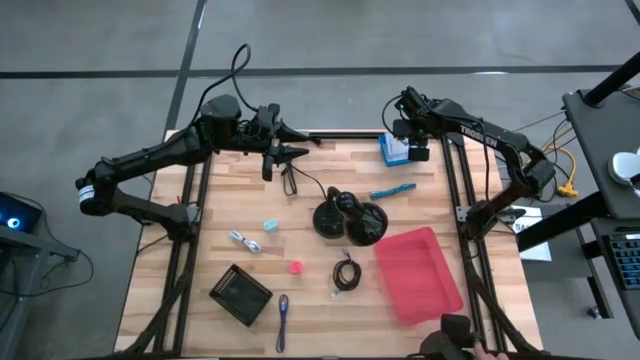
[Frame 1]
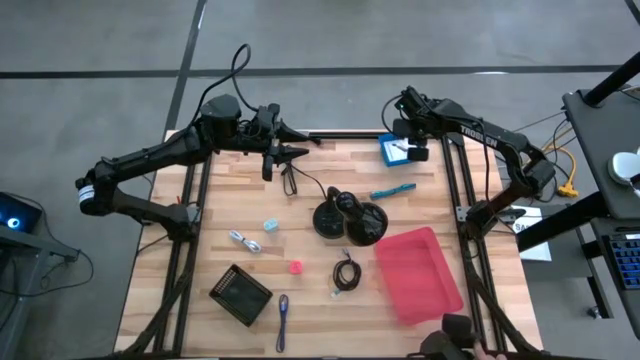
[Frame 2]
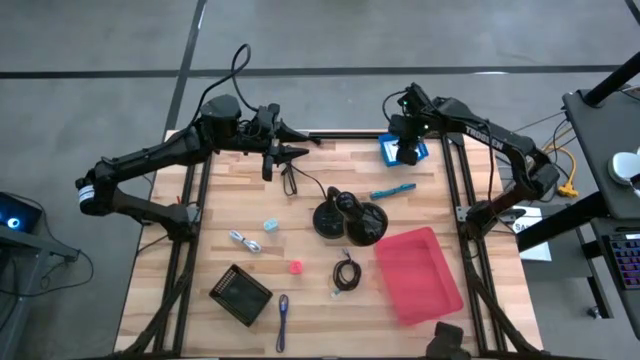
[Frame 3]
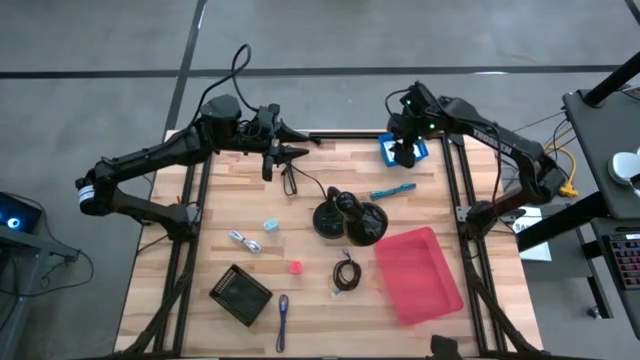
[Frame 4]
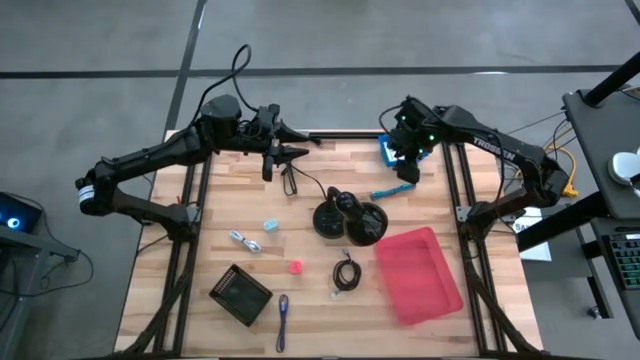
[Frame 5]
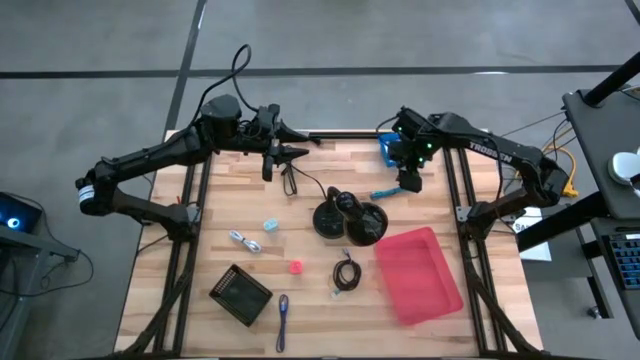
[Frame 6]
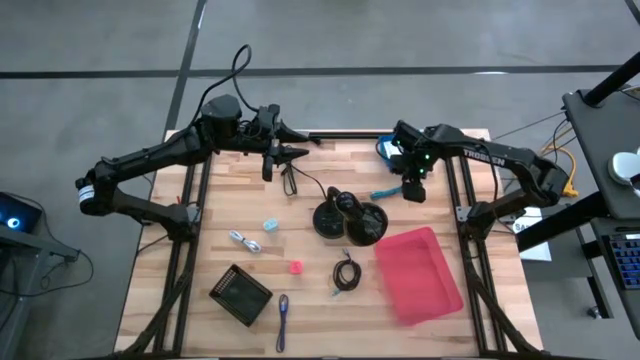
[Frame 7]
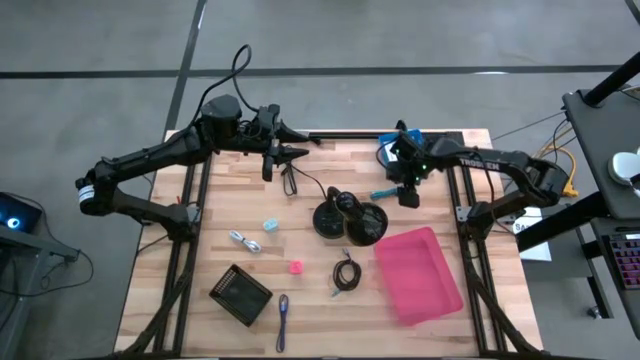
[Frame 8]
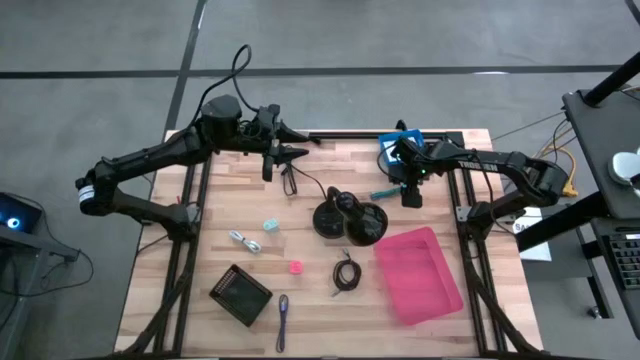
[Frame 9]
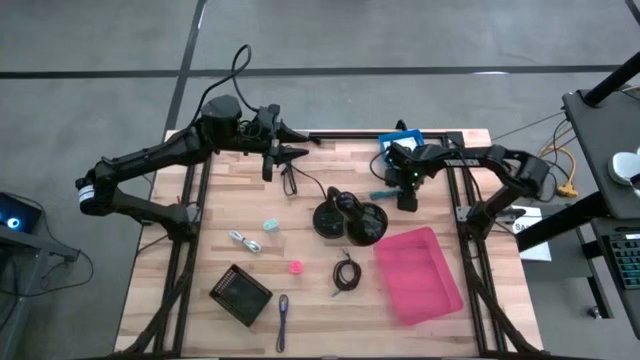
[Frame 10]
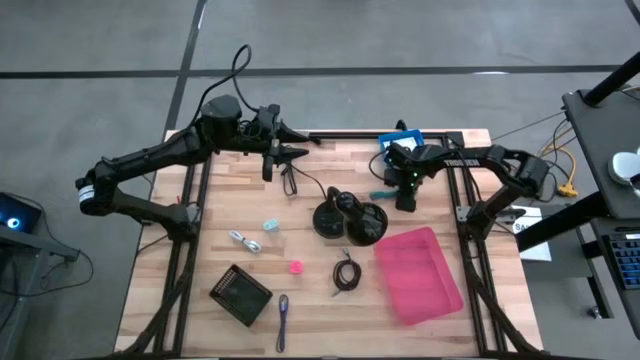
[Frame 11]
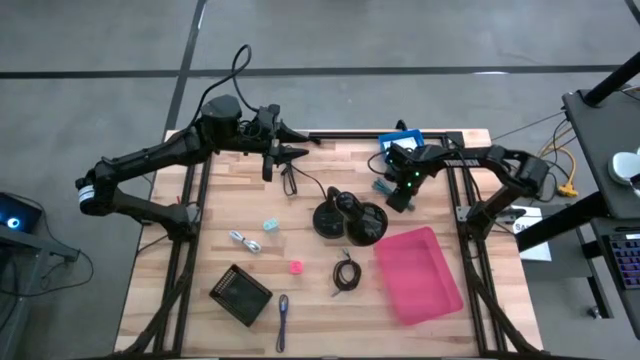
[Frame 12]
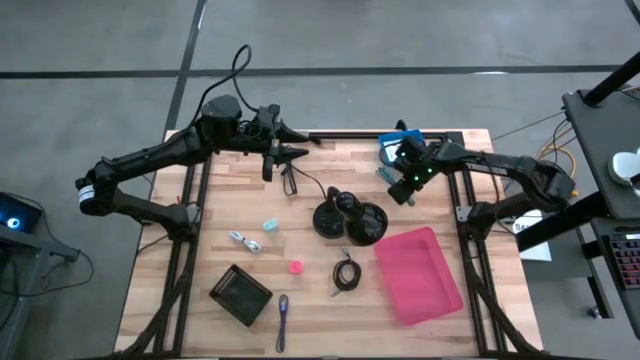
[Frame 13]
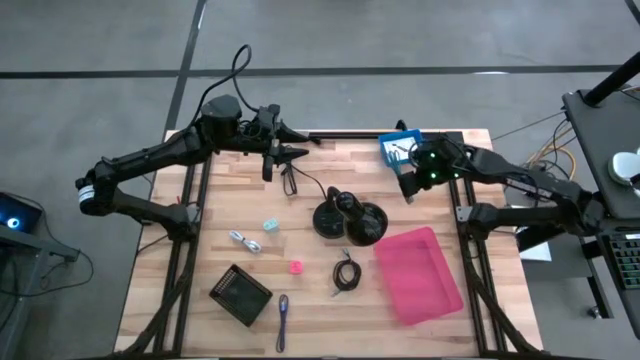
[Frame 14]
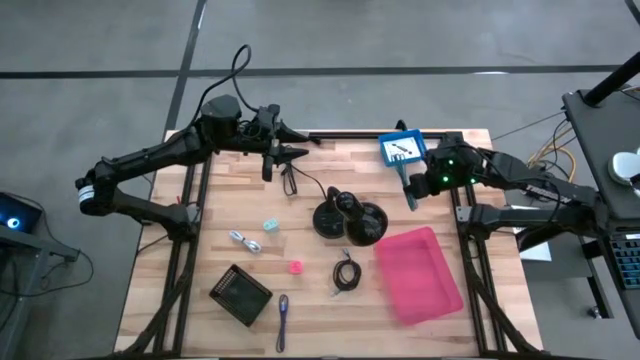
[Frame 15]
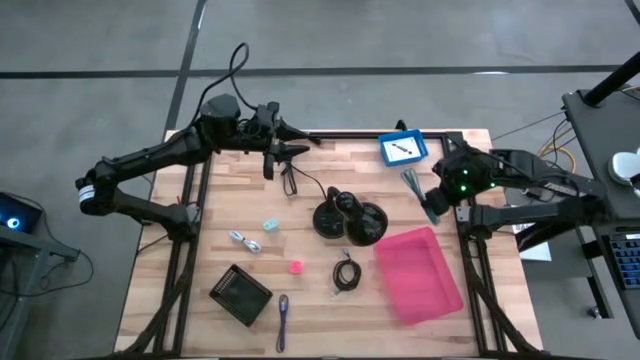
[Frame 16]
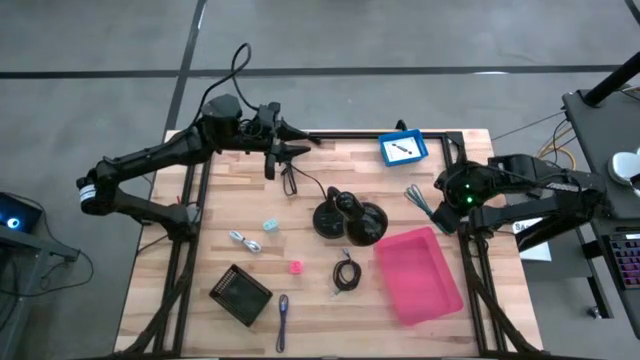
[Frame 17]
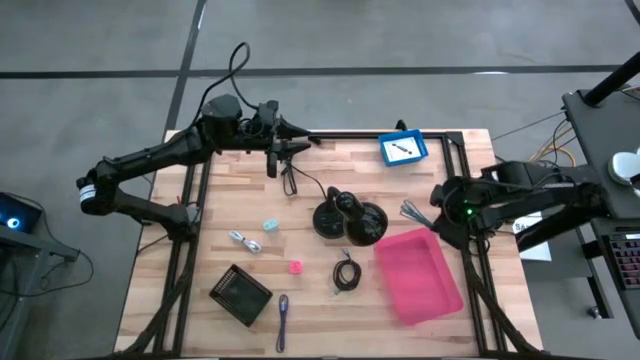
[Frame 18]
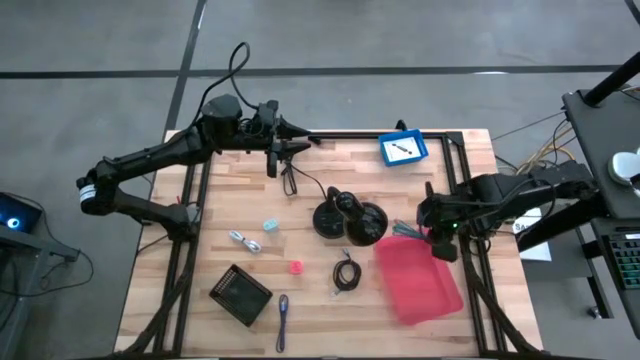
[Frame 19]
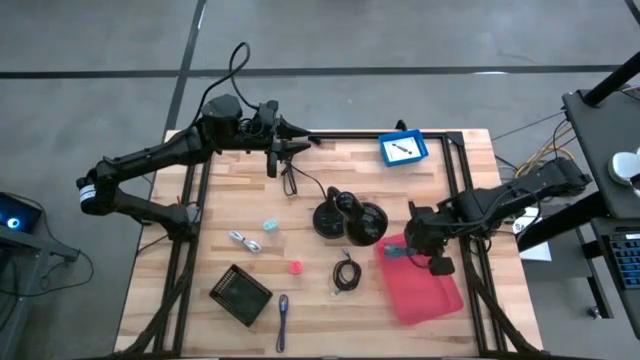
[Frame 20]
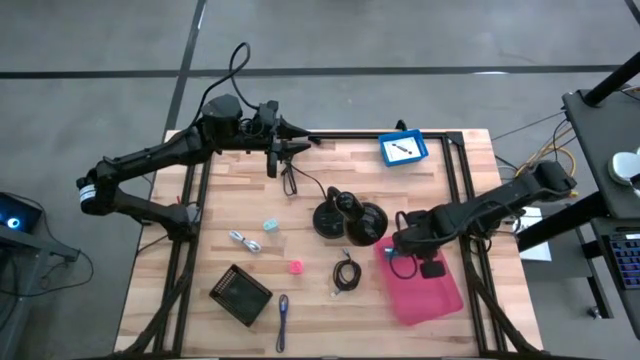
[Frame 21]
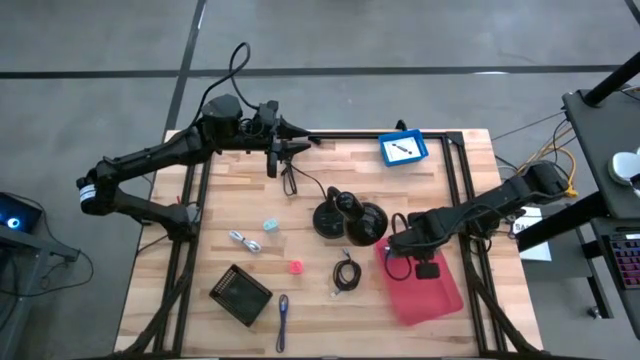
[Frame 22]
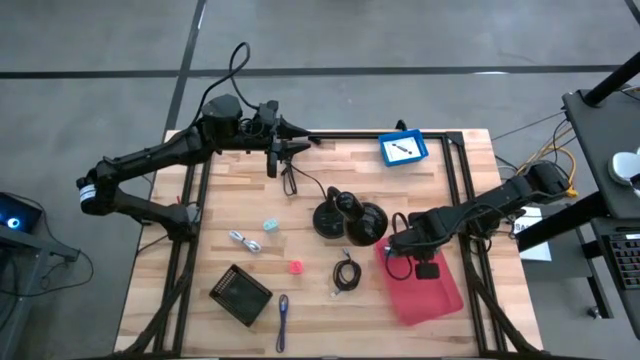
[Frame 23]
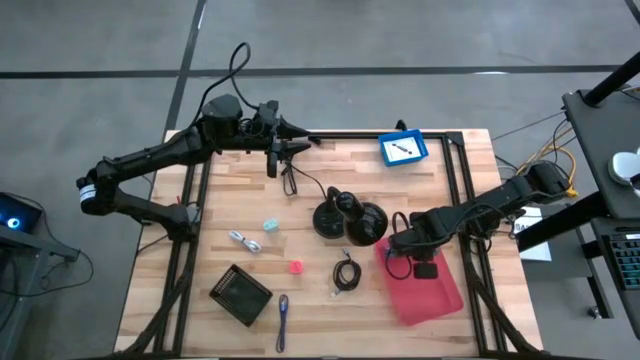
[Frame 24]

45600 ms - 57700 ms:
Task: Pick and place items into bin
Put the blue charger cable into the pink bin

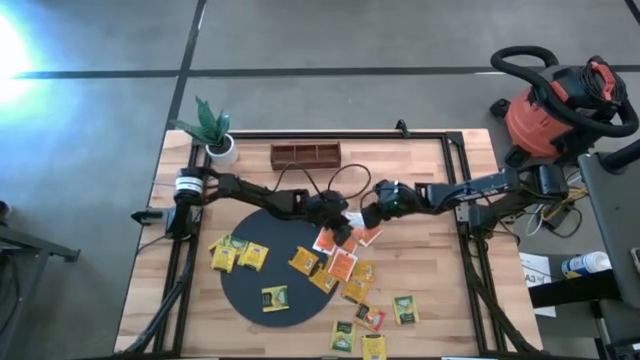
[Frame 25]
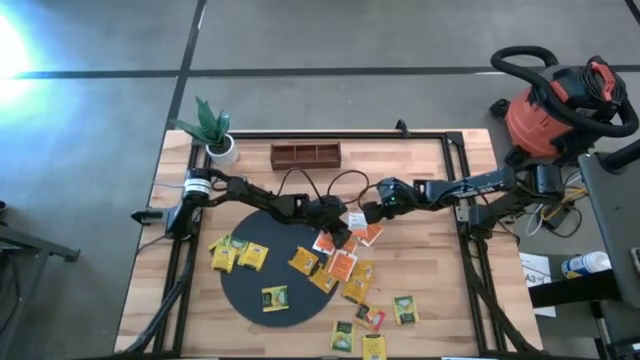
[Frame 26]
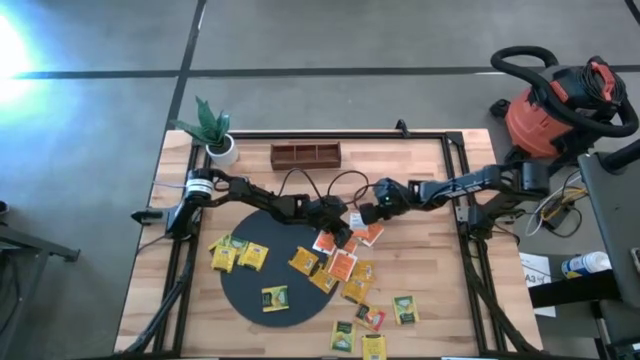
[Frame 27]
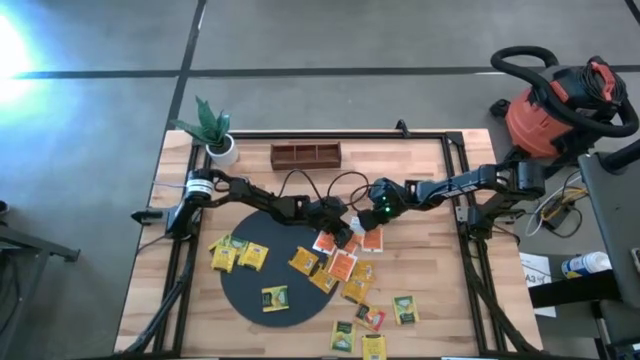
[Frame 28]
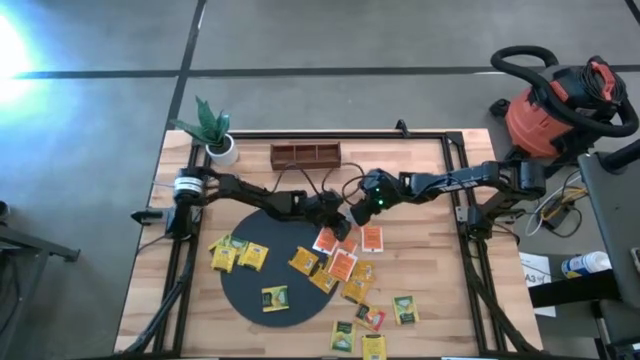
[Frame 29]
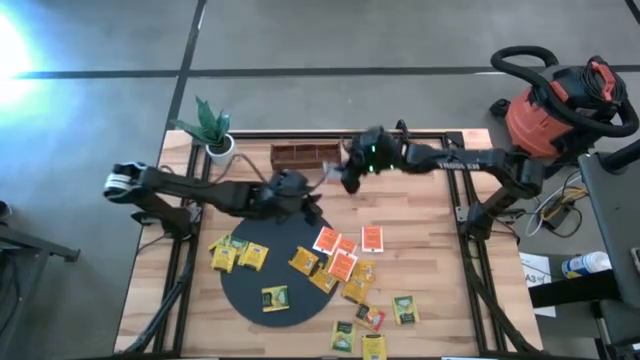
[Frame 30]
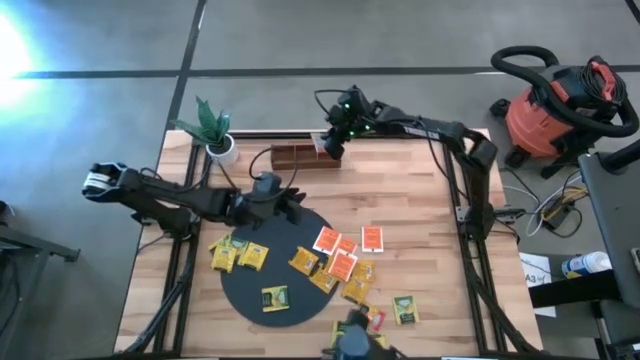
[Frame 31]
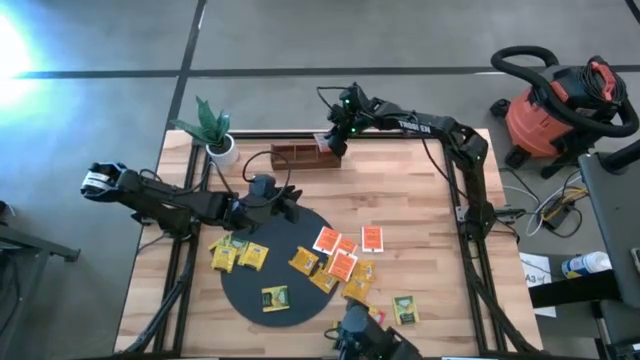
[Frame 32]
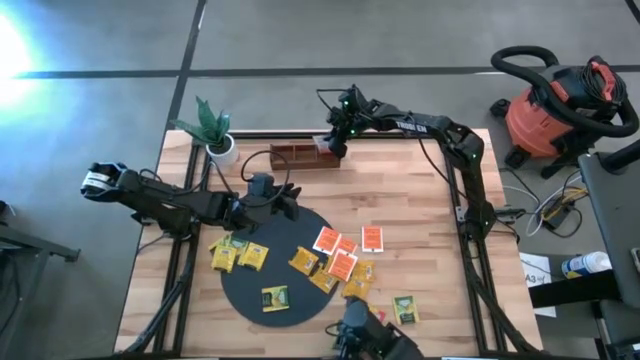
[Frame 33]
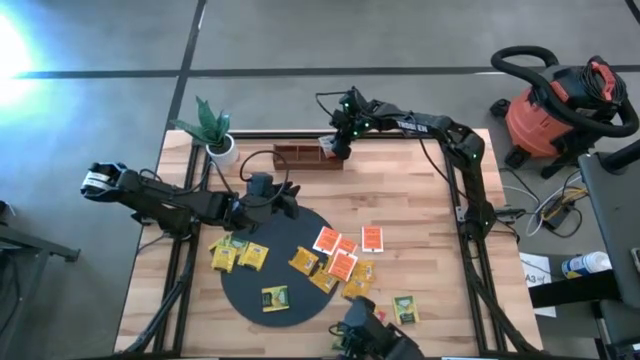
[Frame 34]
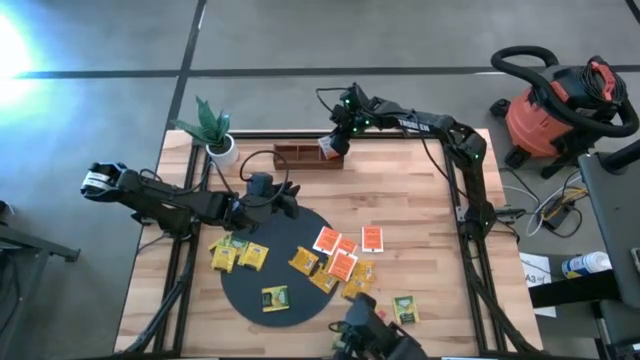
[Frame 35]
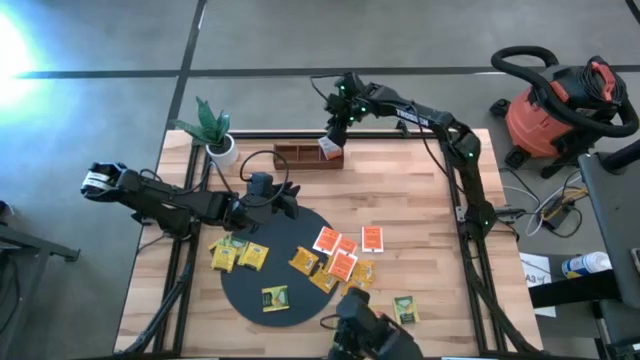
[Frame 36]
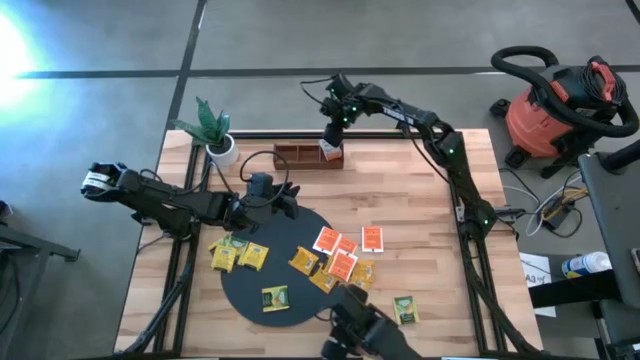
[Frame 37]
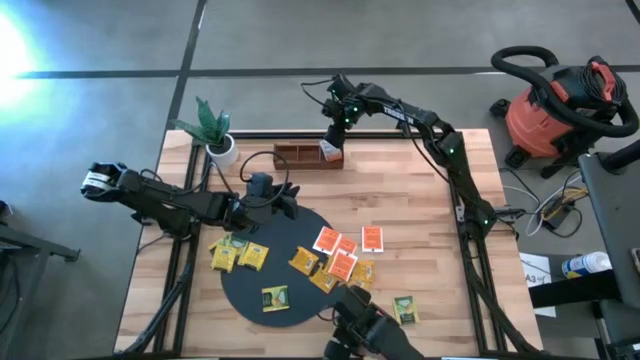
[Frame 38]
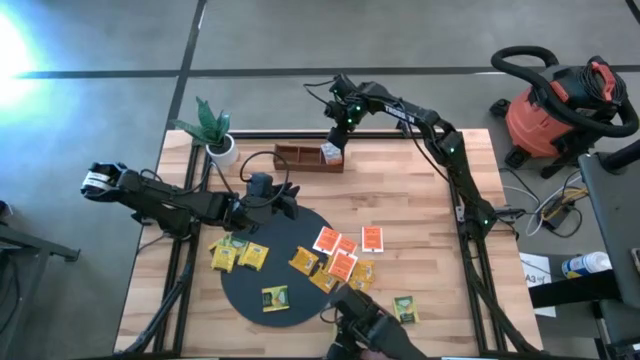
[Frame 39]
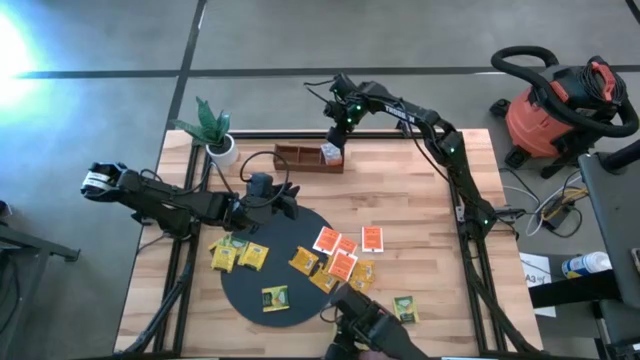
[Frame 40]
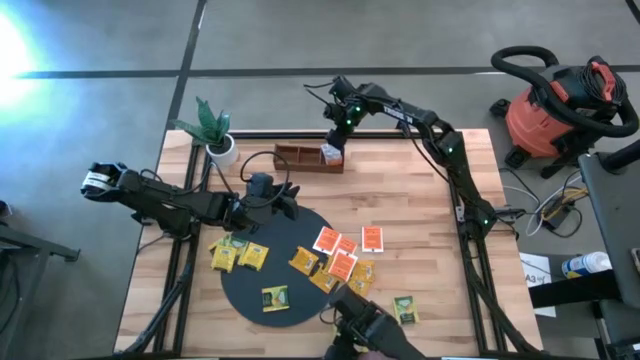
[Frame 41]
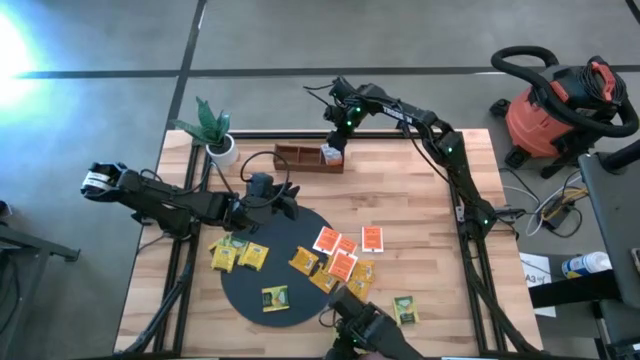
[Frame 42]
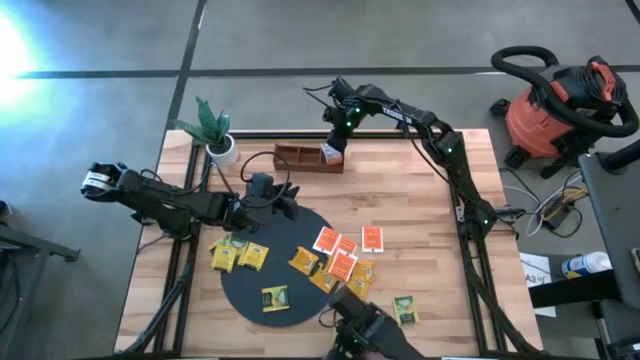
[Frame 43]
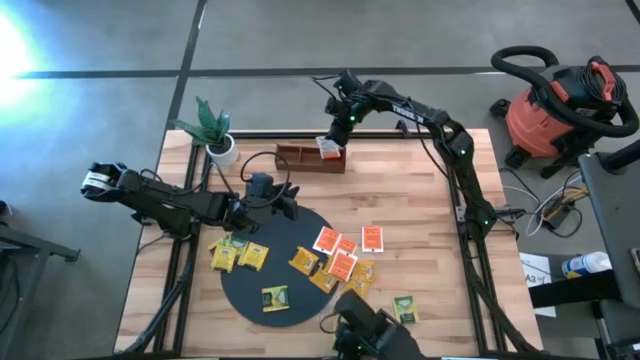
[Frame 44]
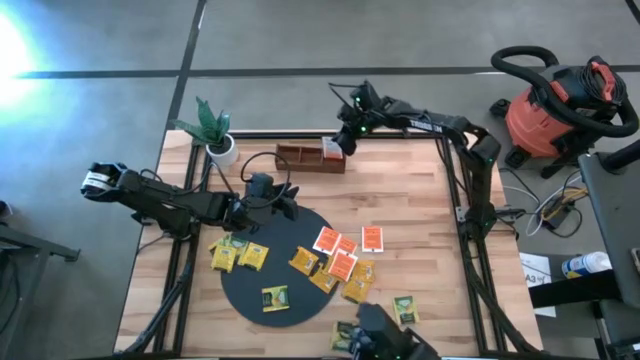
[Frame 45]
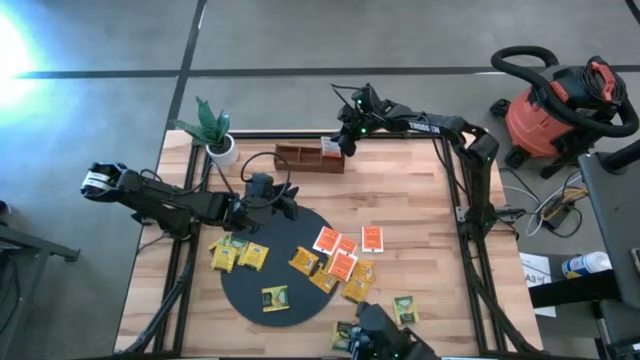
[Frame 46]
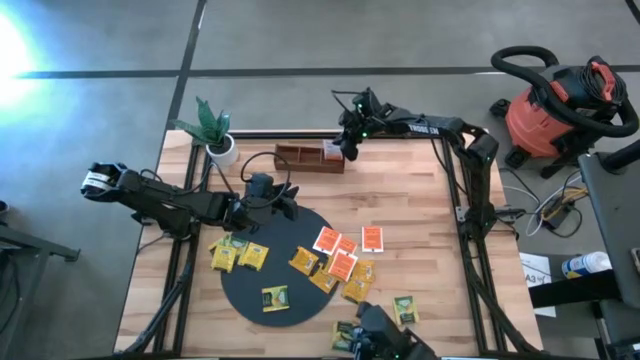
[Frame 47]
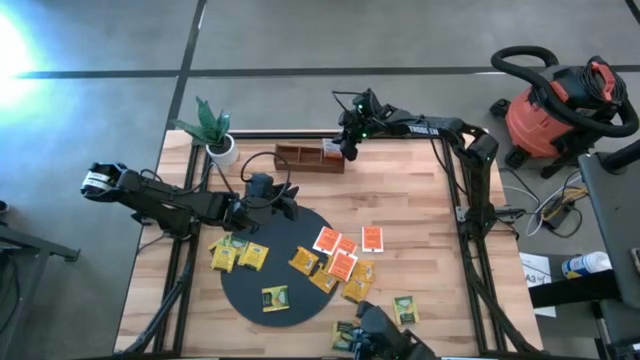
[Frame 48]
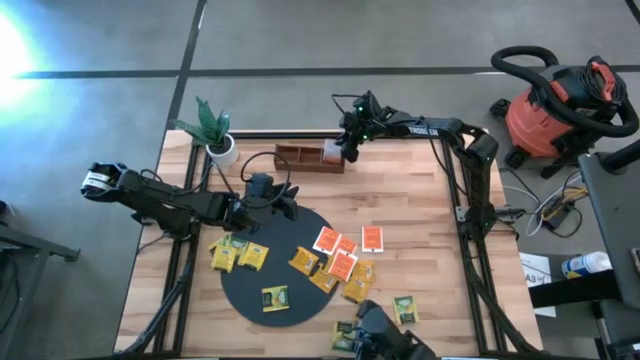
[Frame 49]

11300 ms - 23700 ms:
Task: Pick & Place Tea
Put the white tea bag into the right section of the wooden organizer
